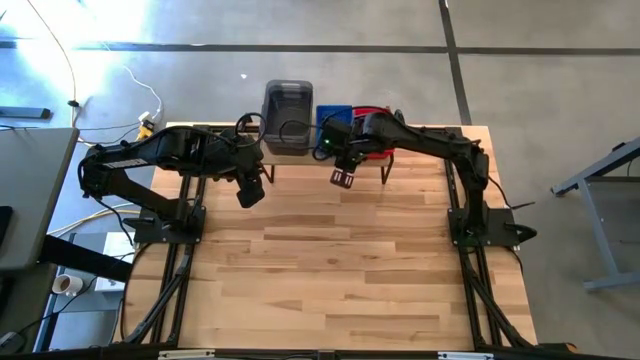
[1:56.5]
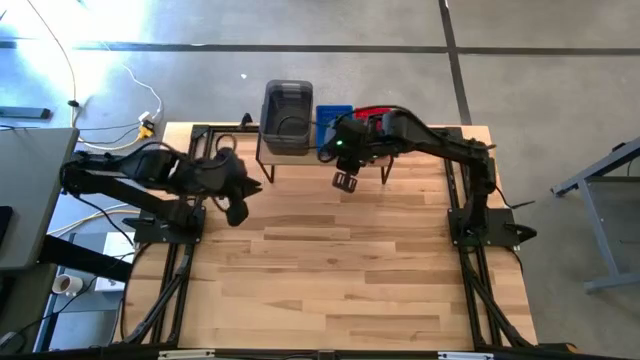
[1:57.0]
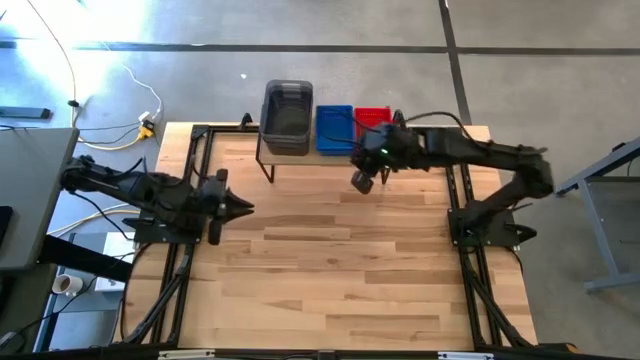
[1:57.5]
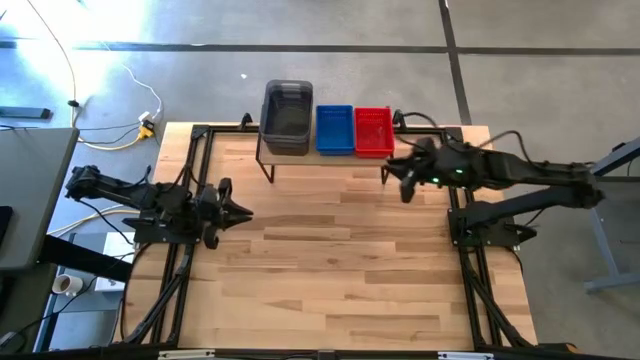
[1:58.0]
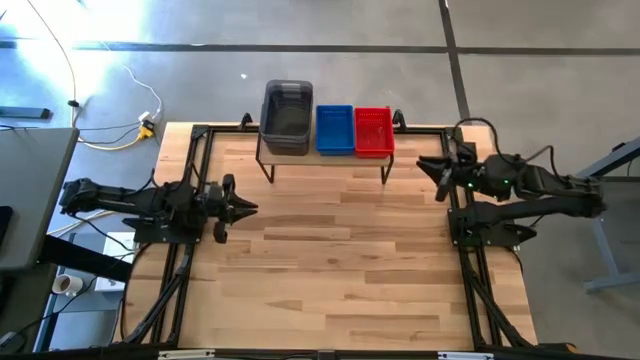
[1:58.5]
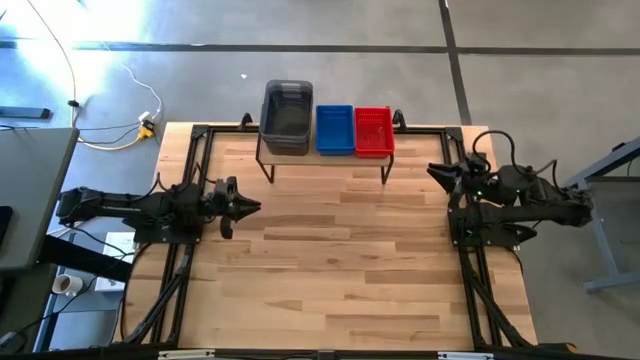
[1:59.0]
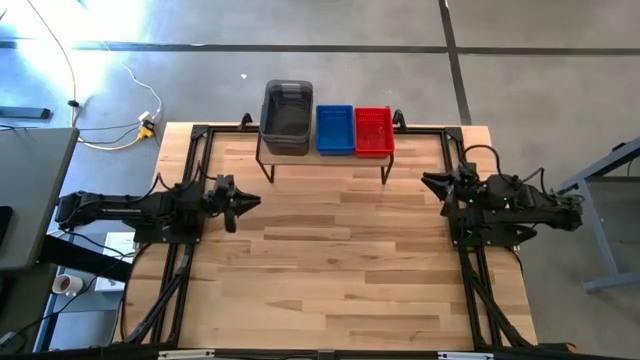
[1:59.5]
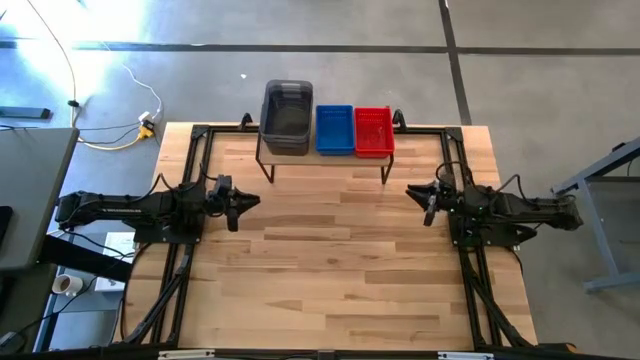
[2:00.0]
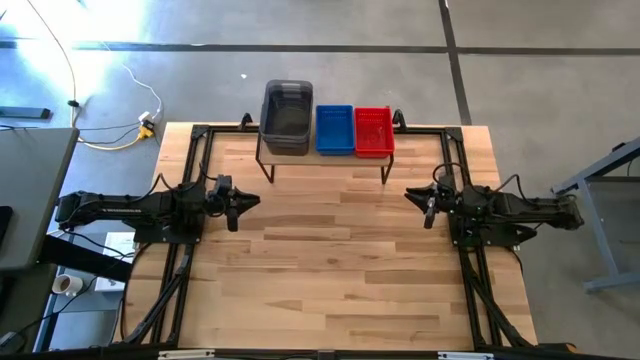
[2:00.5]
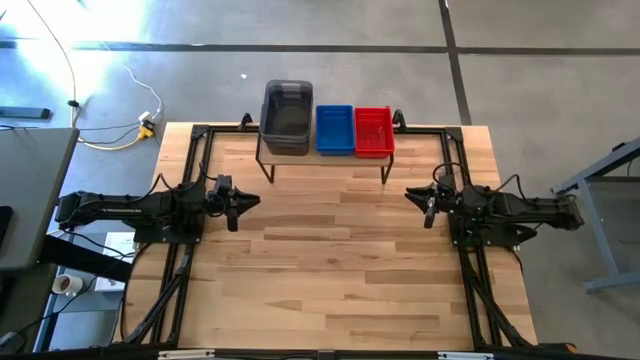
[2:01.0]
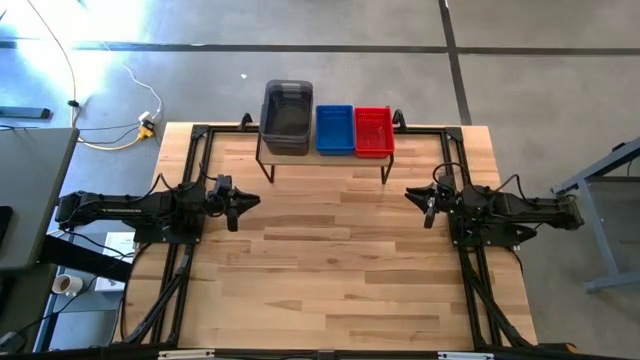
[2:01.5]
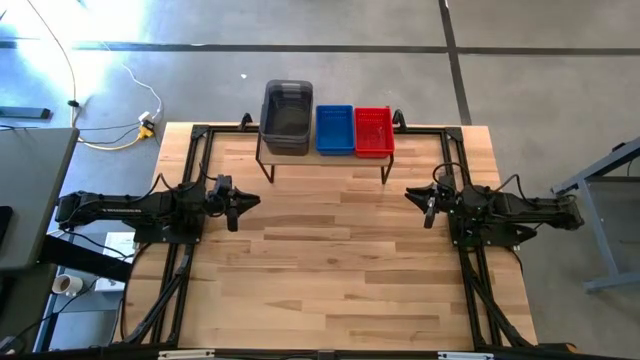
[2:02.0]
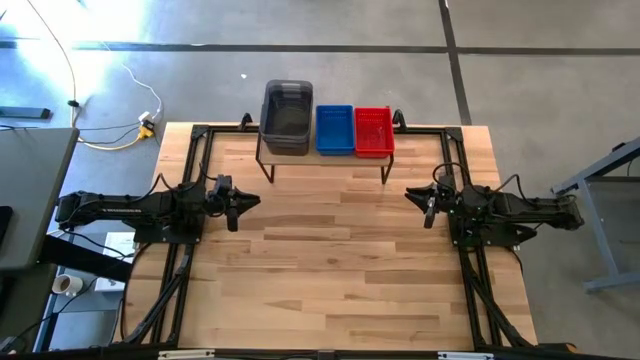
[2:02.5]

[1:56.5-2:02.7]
Task: Stack baskets on shelf by color
Return to Home Position

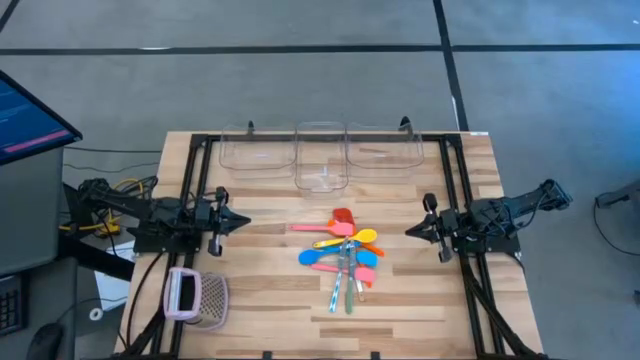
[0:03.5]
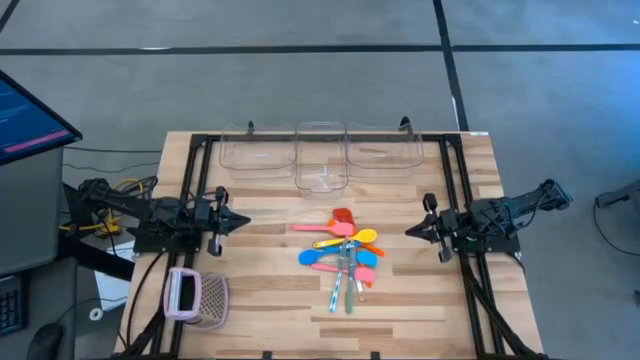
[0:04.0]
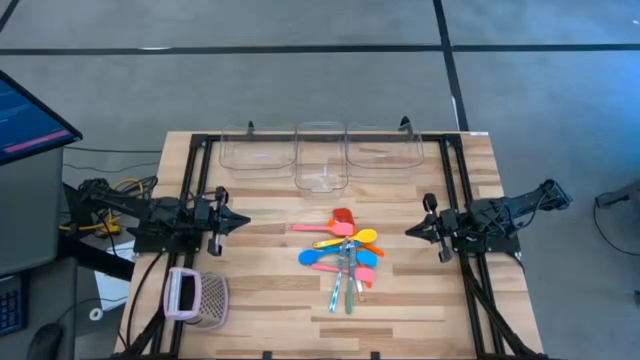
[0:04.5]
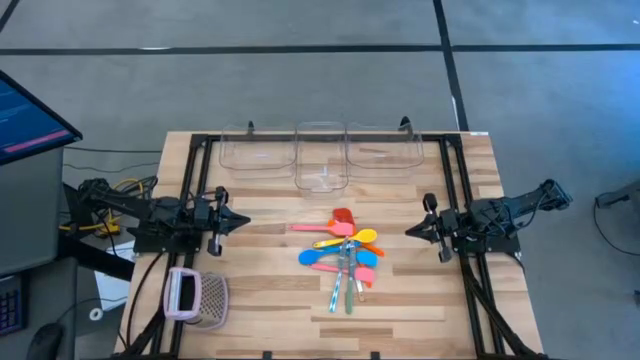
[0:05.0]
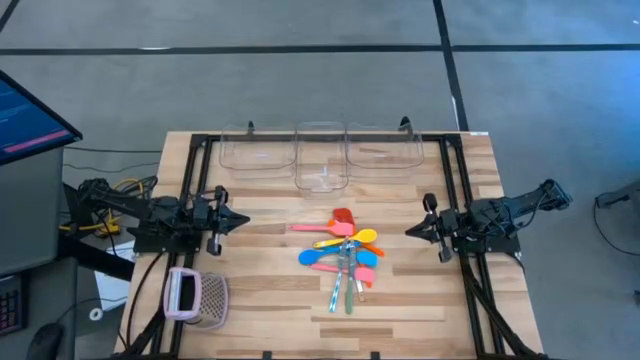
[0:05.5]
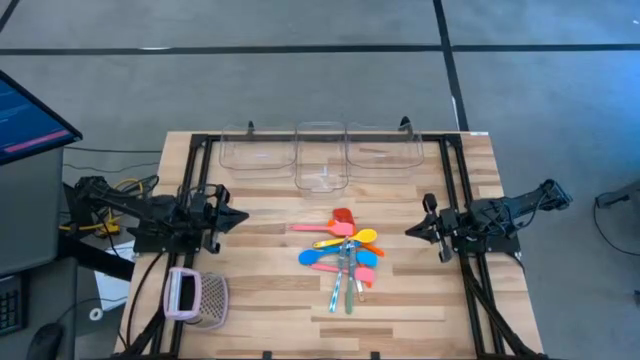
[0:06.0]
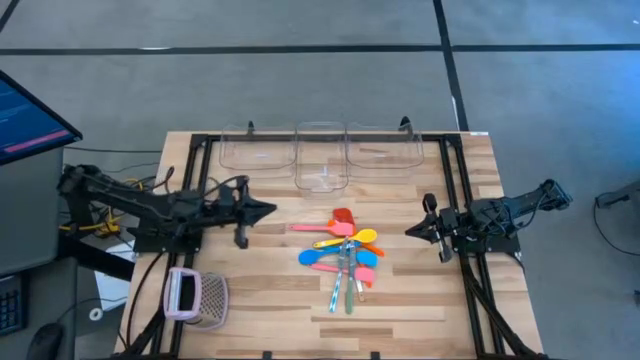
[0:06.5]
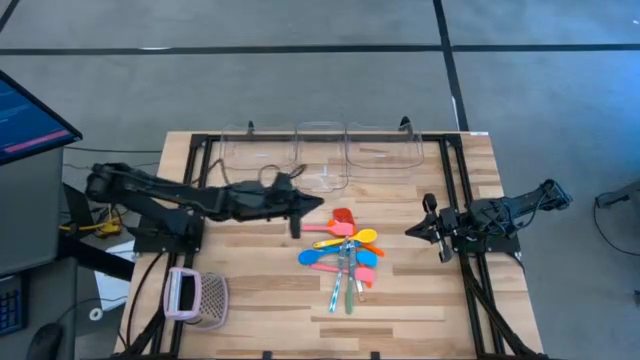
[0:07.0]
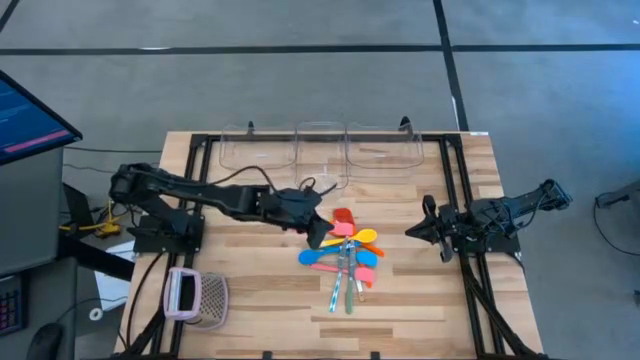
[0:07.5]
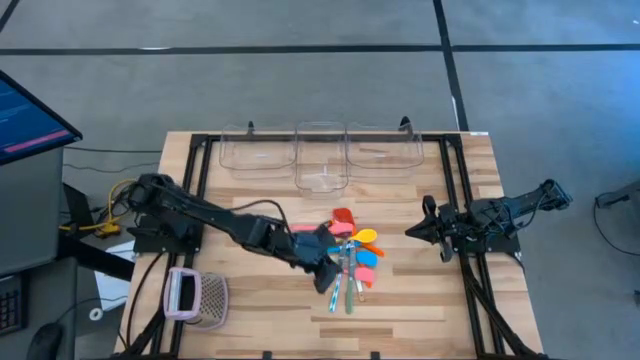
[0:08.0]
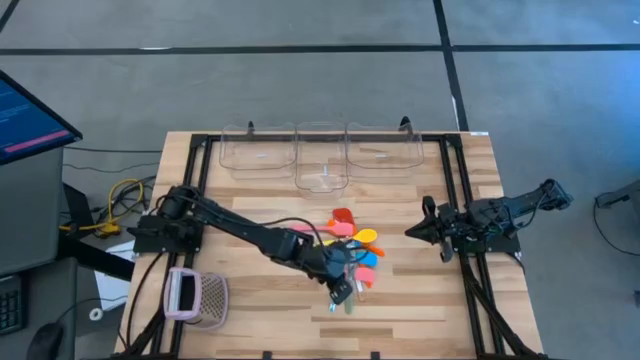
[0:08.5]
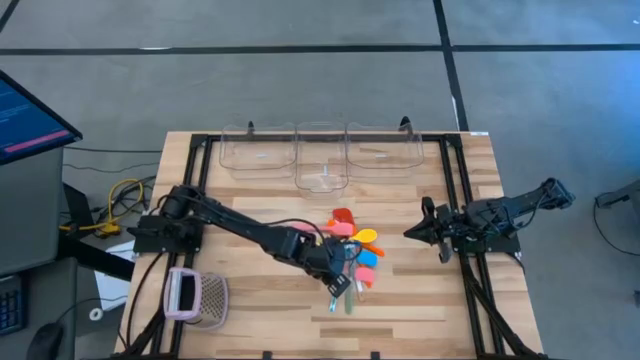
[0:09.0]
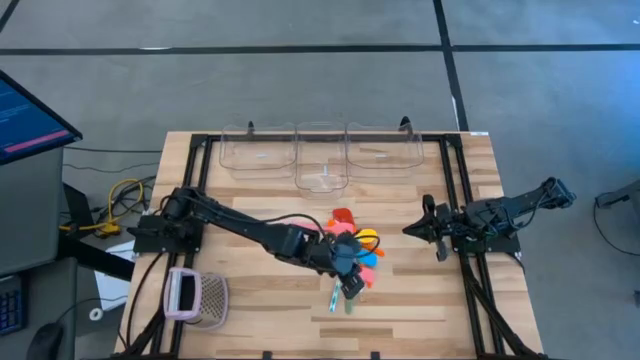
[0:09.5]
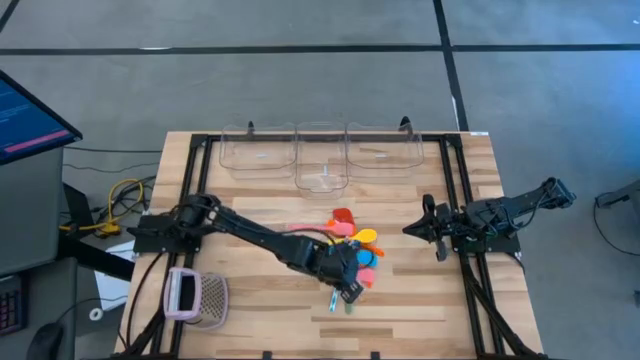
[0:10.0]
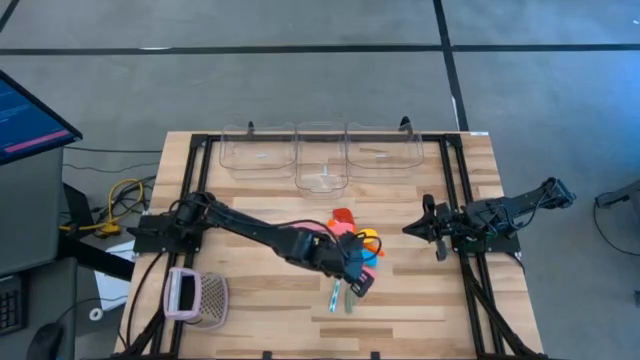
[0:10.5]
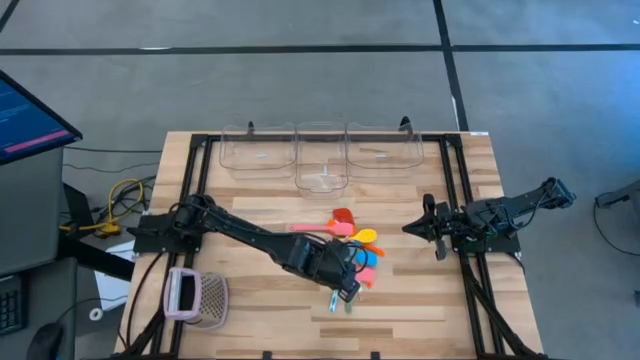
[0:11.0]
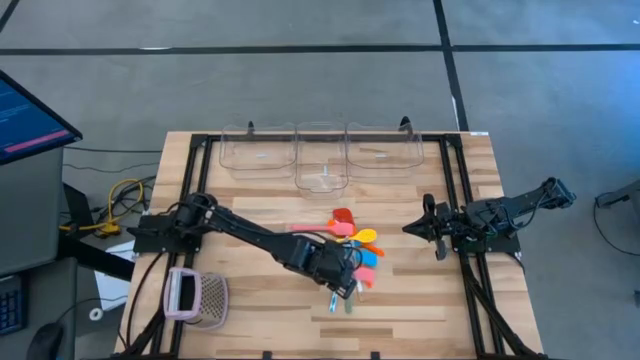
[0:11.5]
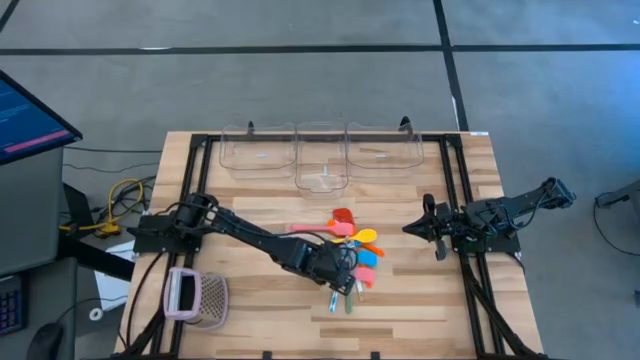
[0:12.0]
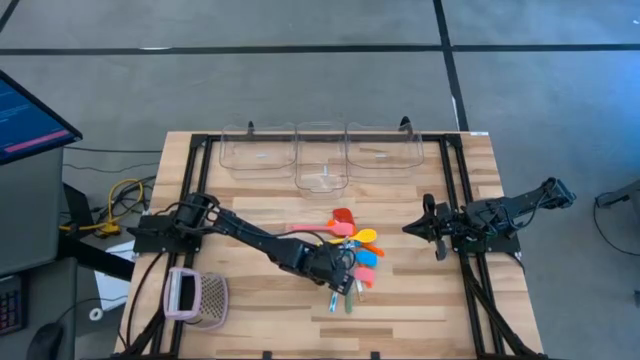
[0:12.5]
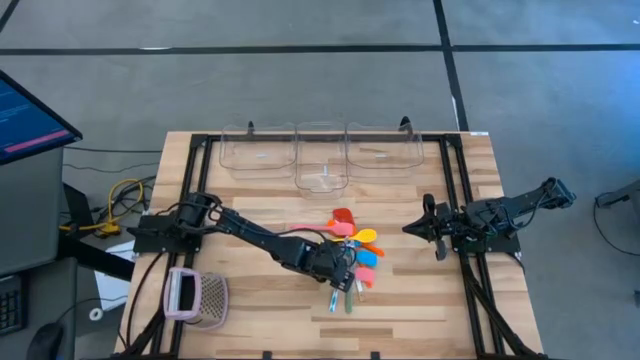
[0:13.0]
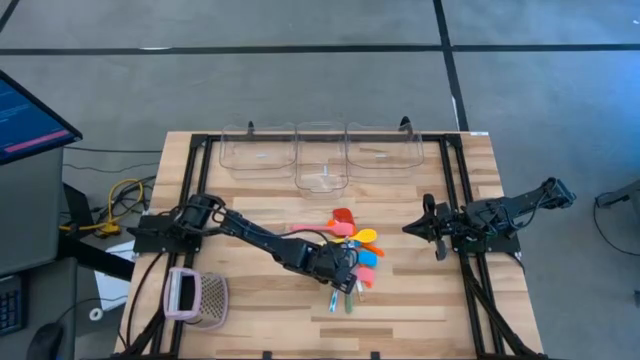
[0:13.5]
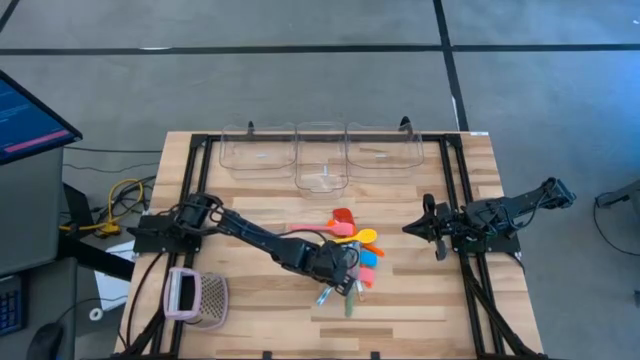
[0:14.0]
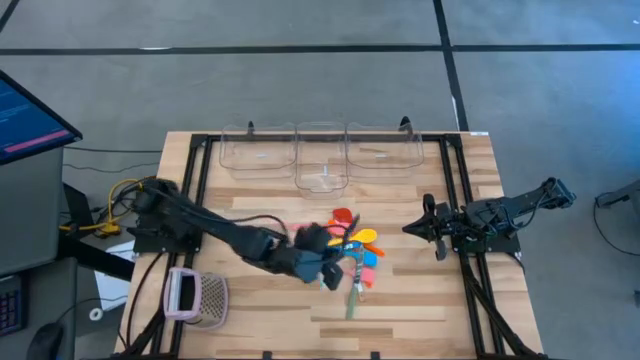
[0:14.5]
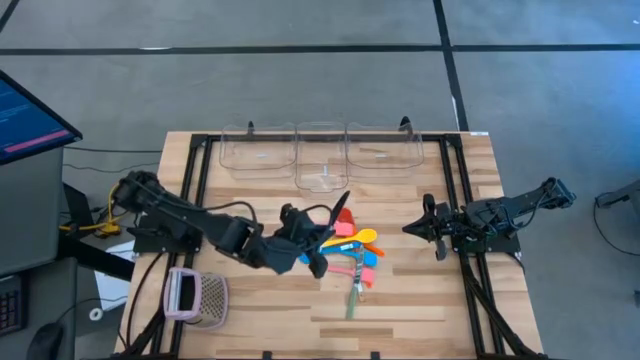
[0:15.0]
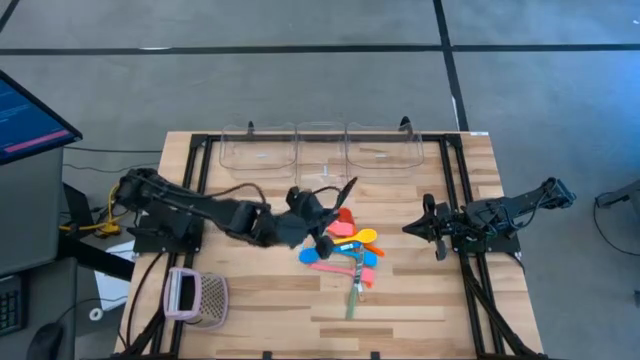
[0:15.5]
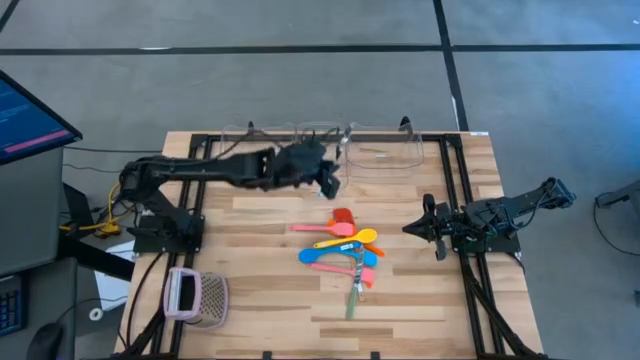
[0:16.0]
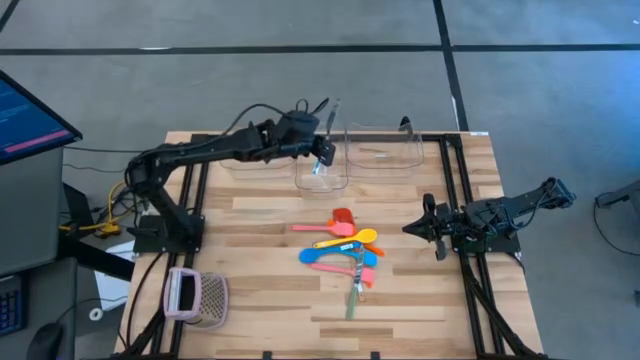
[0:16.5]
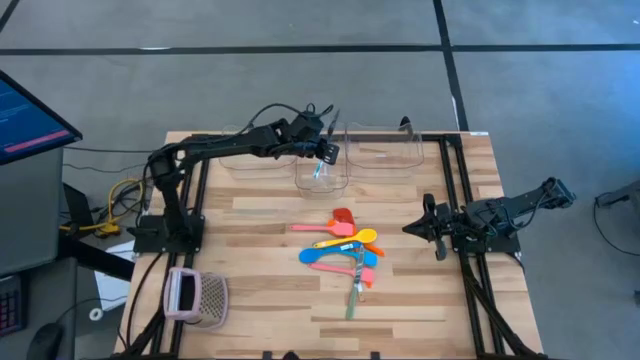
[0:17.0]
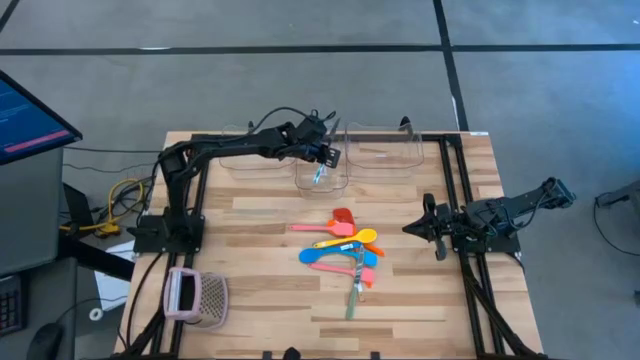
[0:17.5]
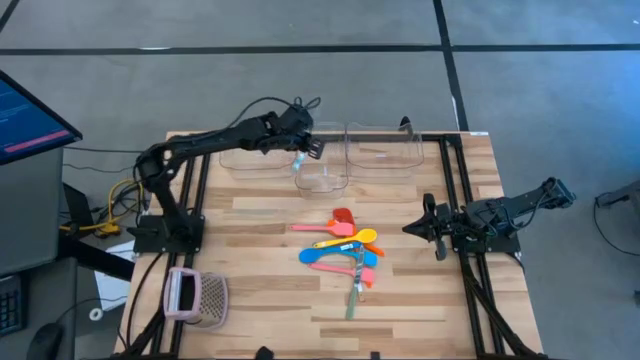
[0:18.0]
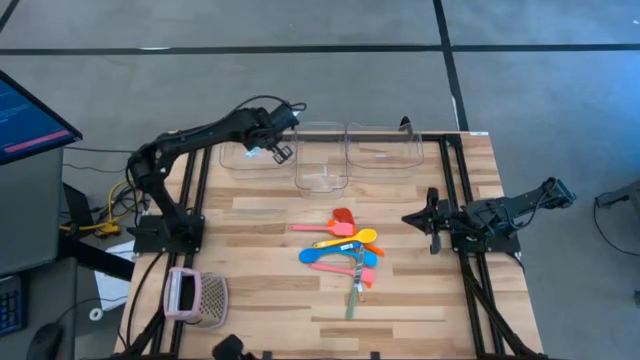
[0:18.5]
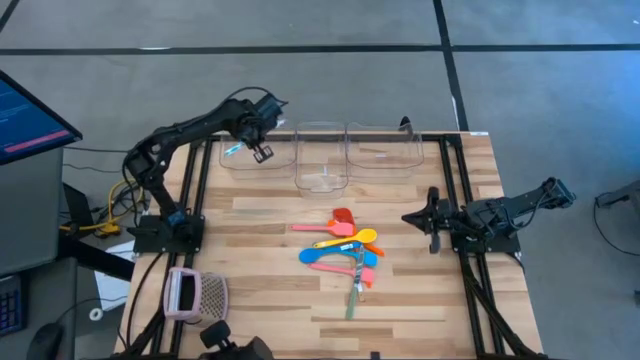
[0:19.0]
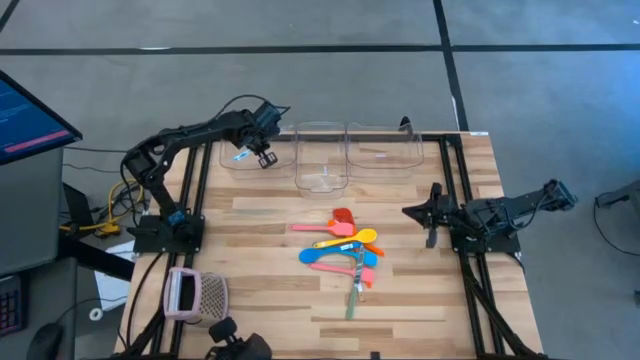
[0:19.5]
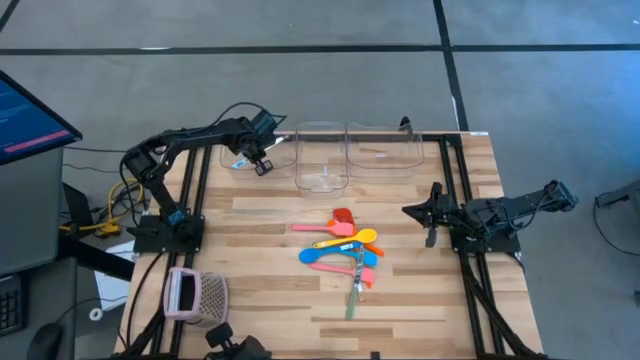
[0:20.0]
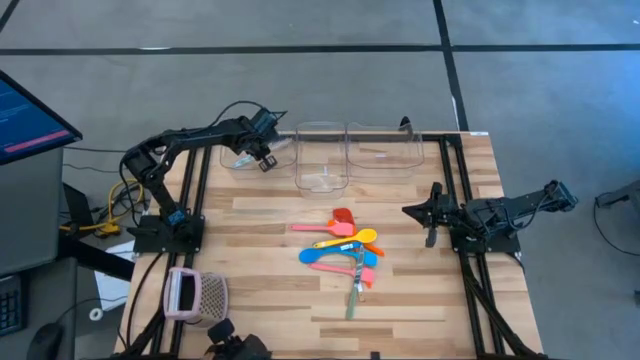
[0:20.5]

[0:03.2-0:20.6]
Task: Pick & Place Kitchen Items
Put the blue table knife into the left transparent bin
